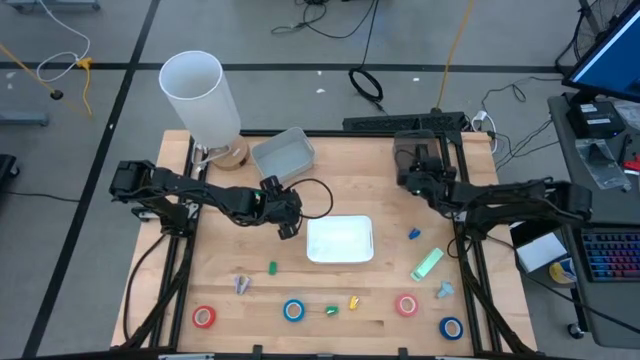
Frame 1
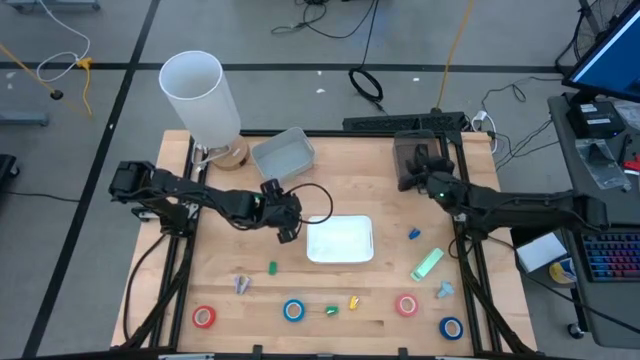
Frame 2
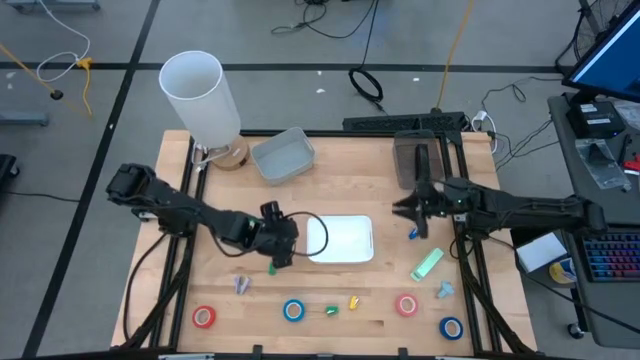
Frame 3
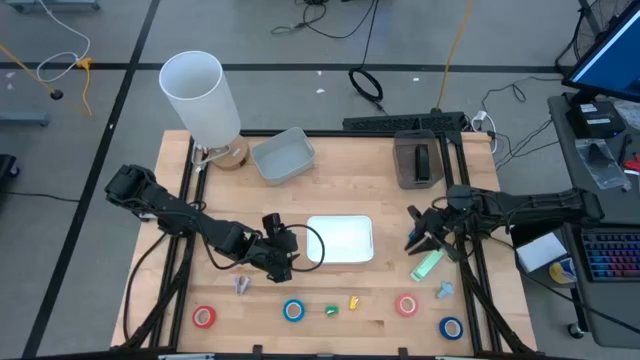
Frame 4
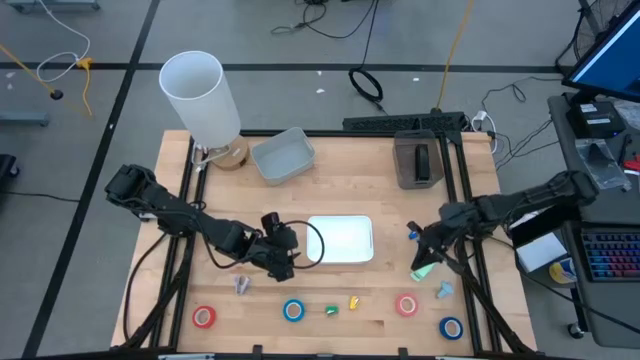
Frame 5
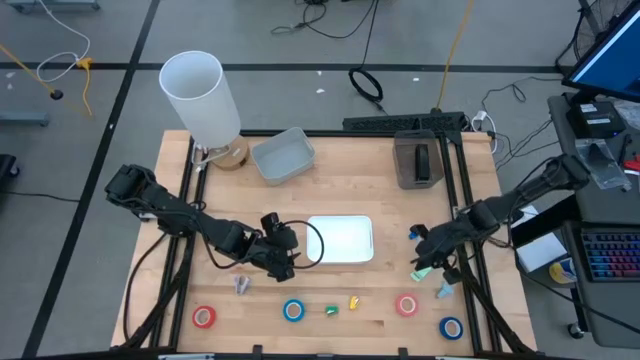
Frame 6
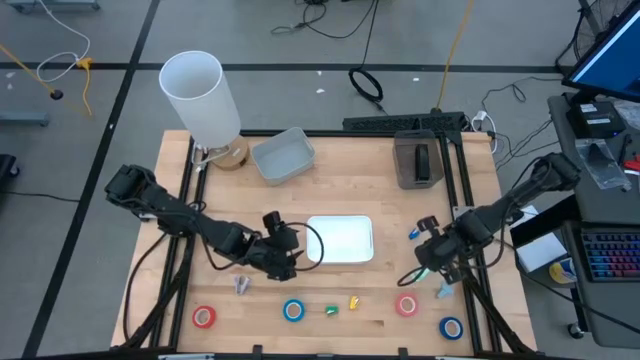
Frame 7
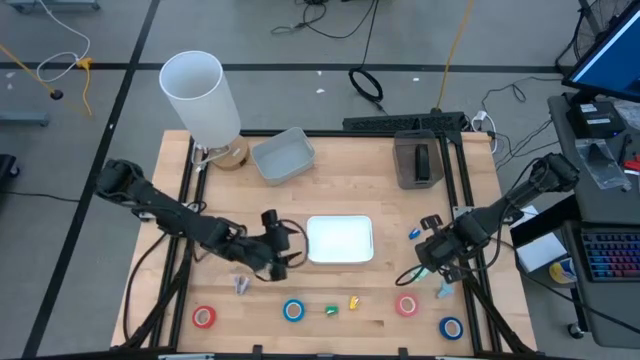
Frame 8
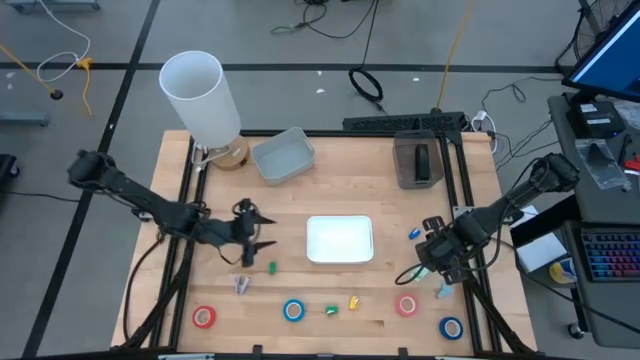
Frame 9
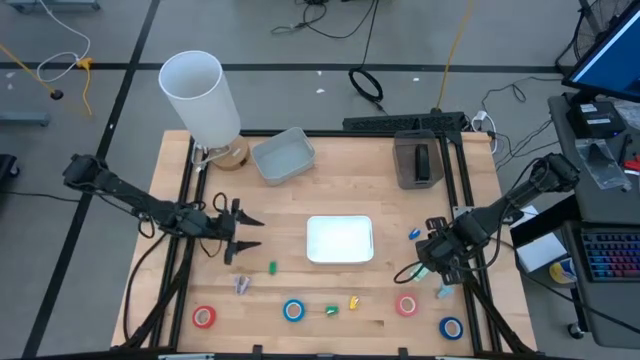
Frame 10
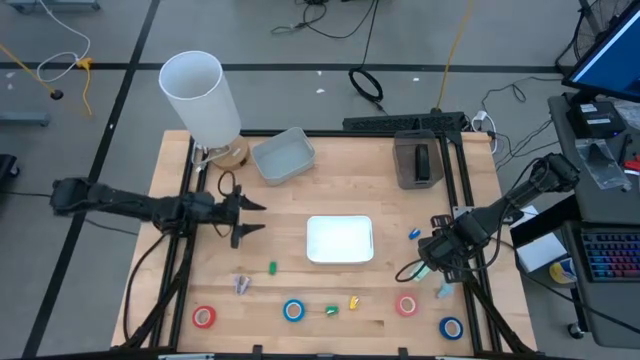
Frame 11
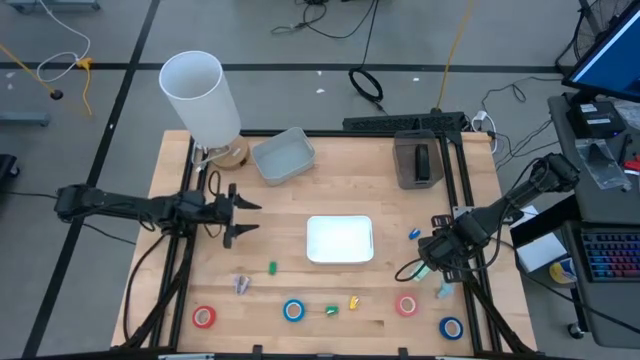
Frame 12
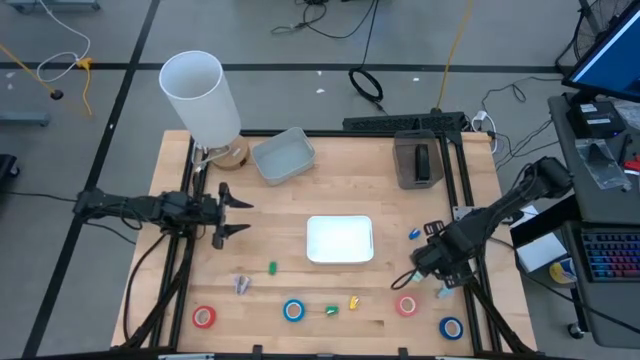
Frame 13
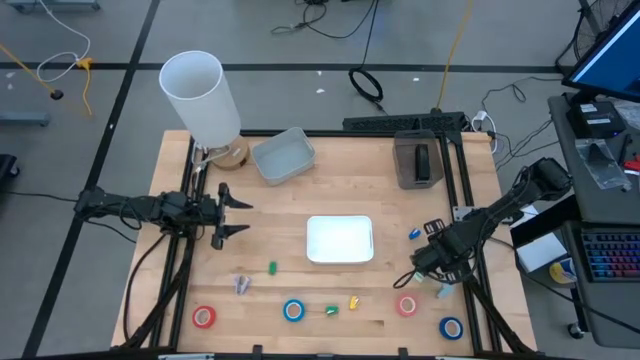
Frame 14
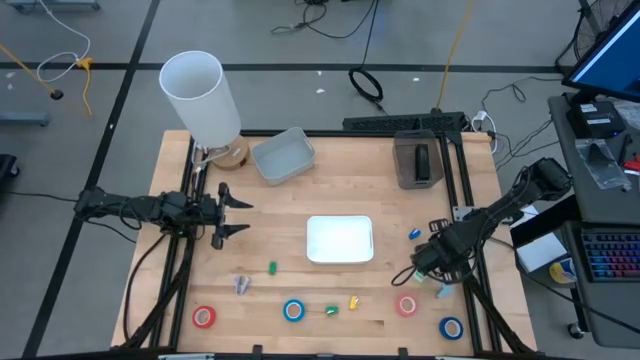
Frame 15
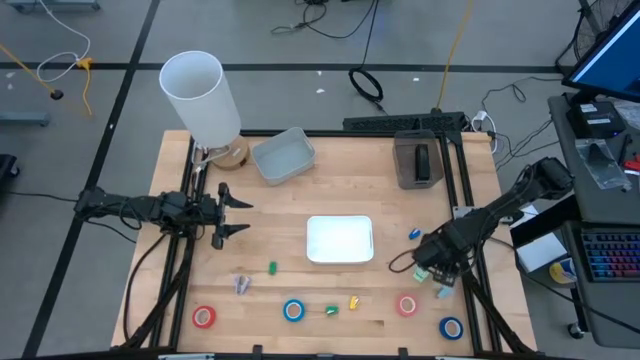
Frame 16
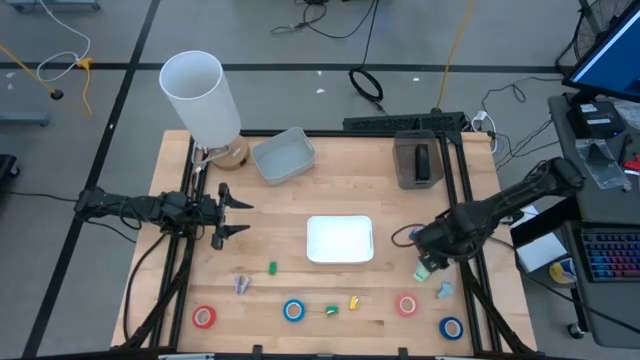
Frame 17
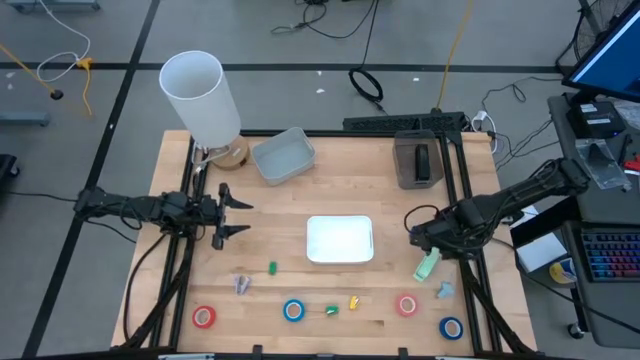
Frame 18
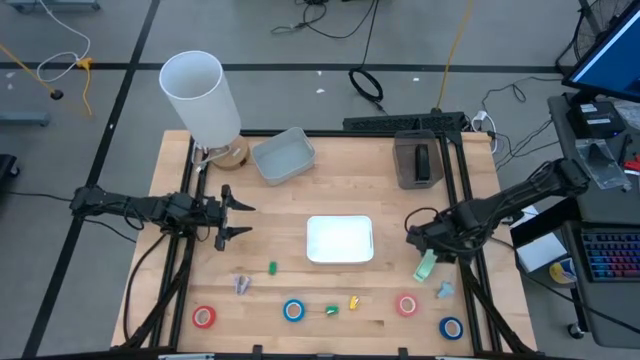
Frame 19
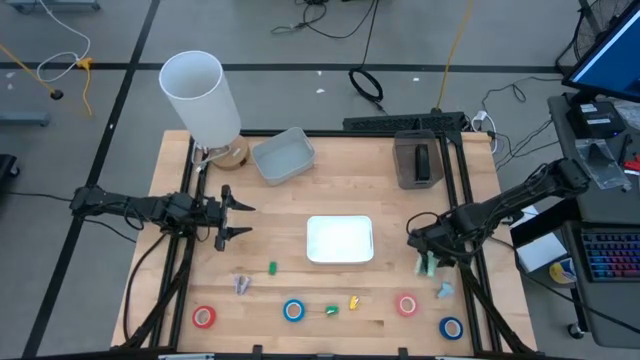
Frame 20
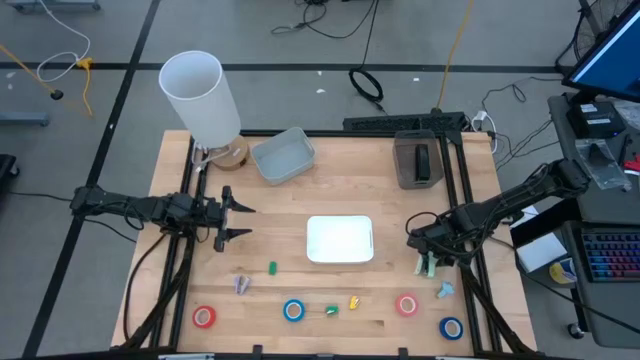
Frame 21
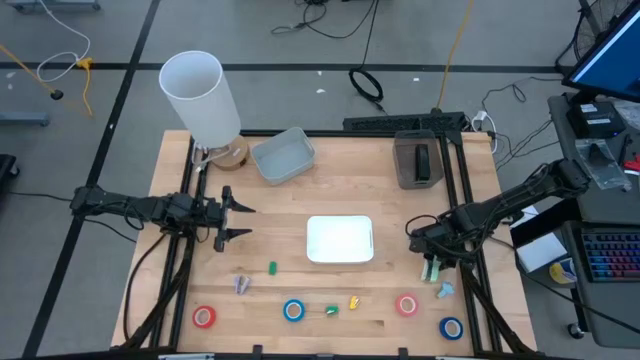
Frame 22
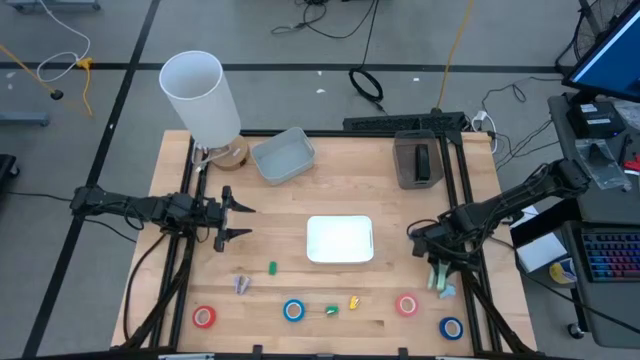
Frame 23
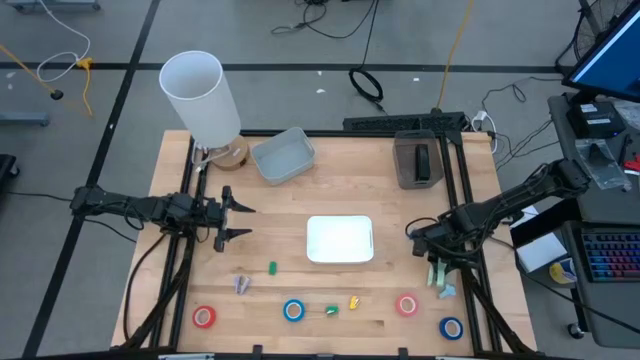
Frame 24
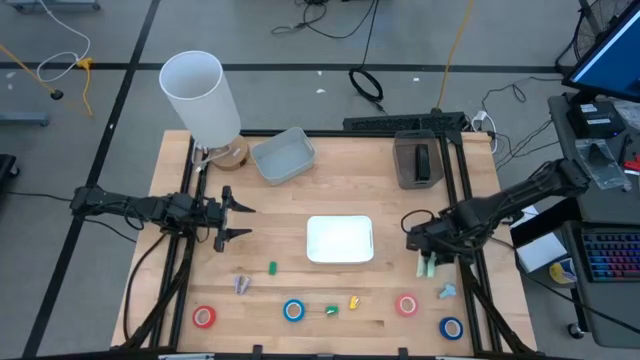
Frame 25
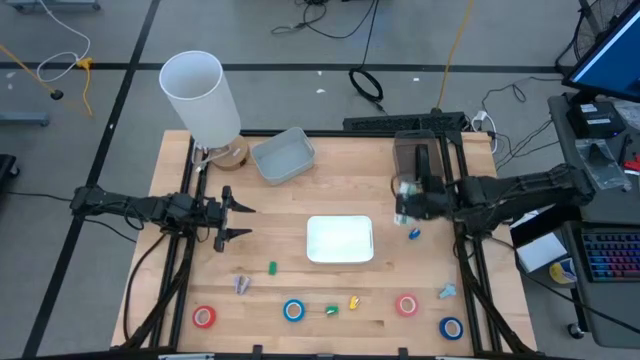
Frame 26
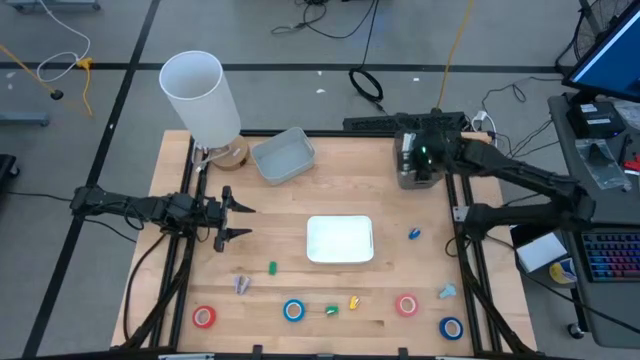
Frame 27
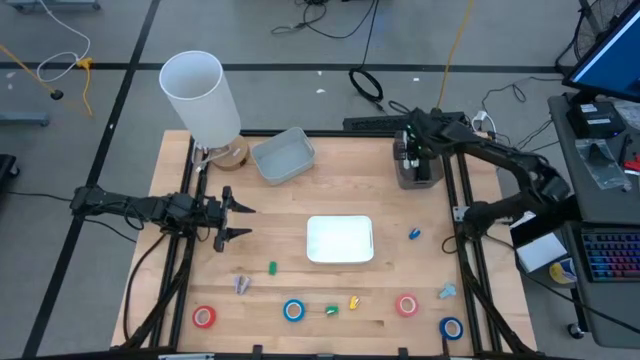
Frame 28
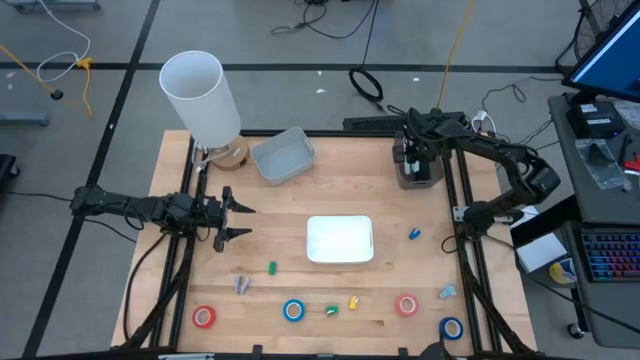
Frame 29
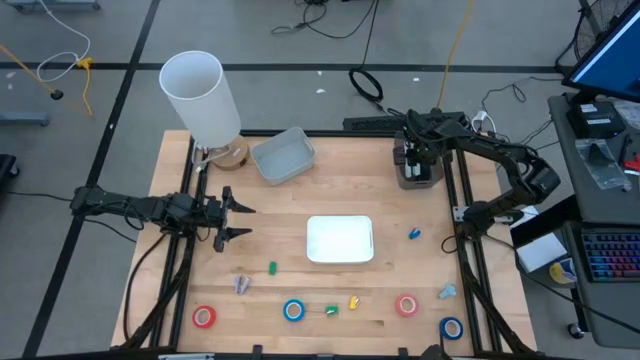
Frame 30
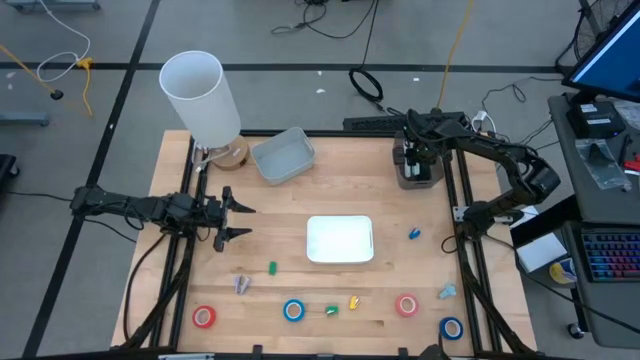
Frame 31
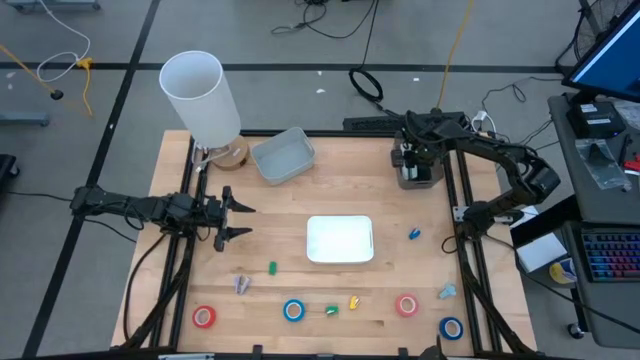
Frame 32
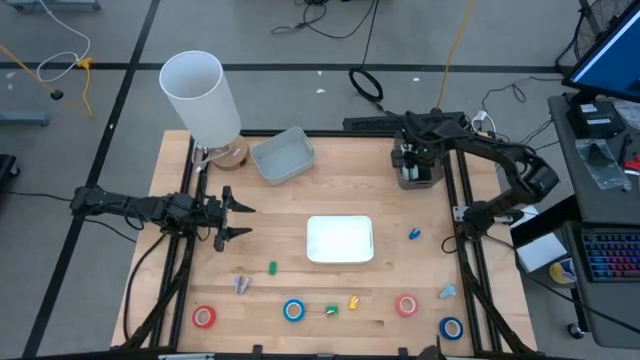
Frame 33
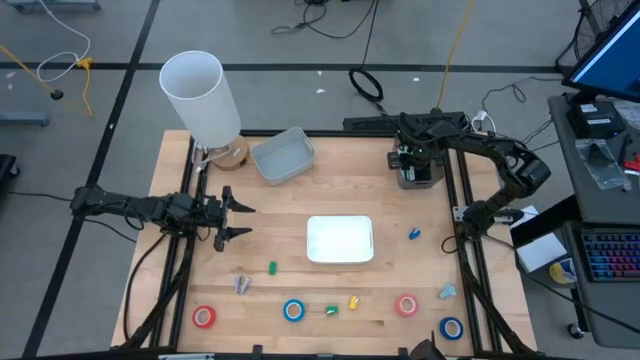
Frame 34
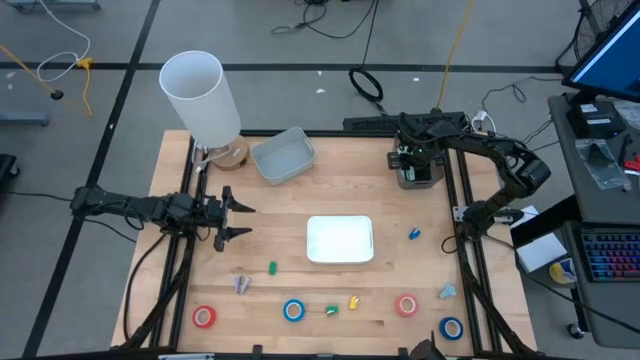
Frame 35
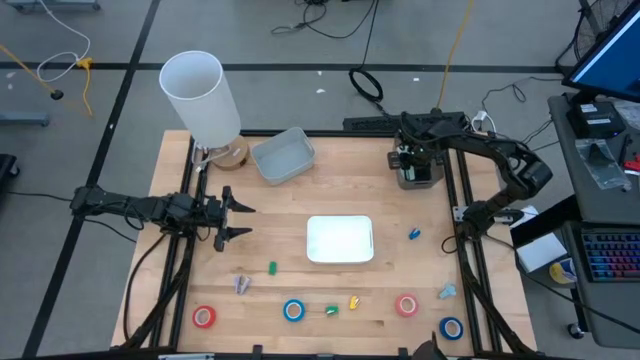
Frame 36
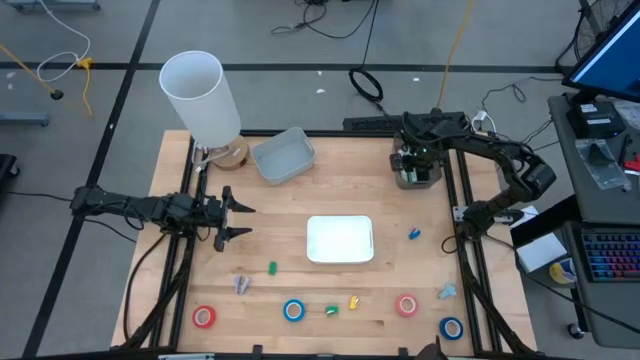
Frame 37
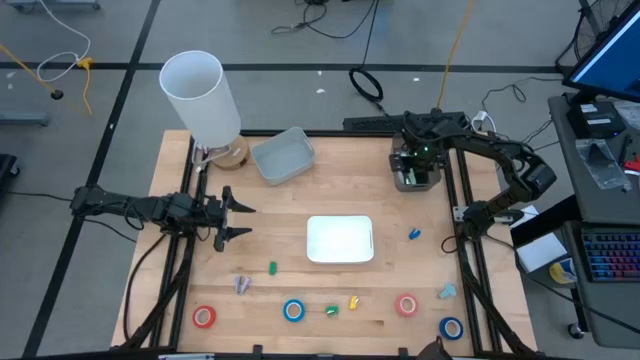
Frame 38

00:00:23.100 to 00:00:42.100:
Task: Pick and place Stapler, Stapler remover, tape
Put the light green stapler into the black bin
